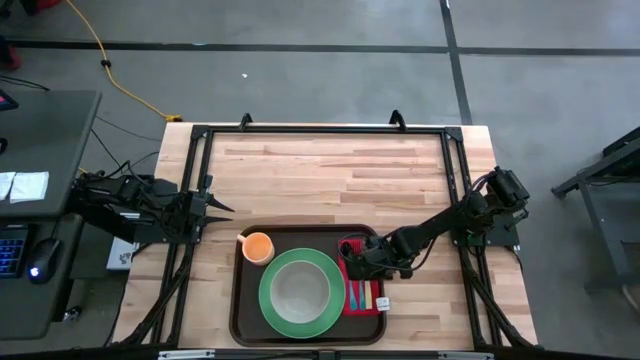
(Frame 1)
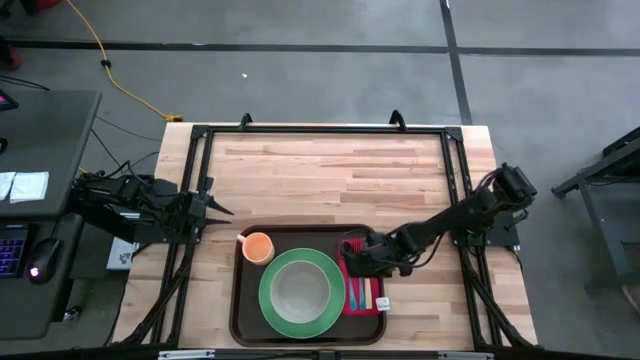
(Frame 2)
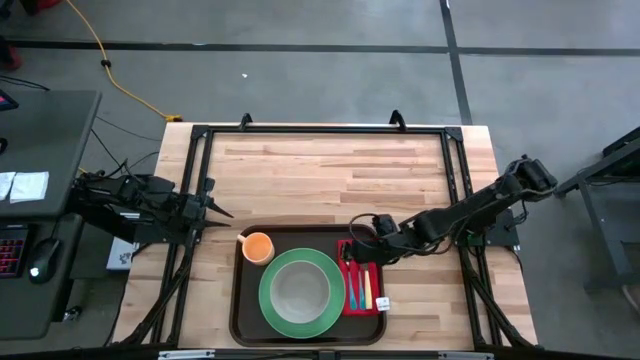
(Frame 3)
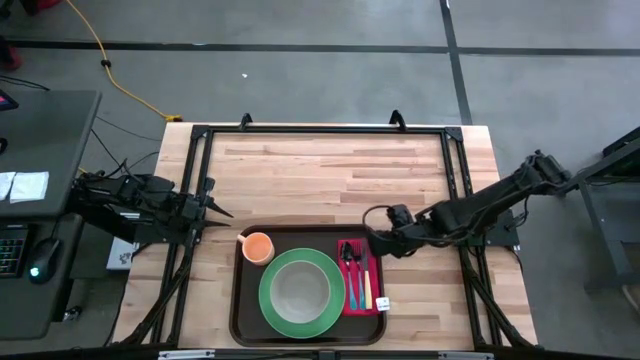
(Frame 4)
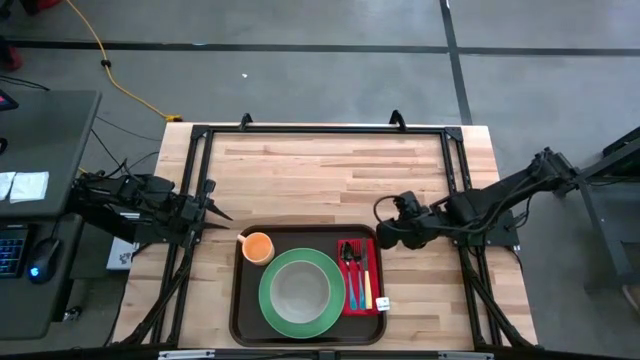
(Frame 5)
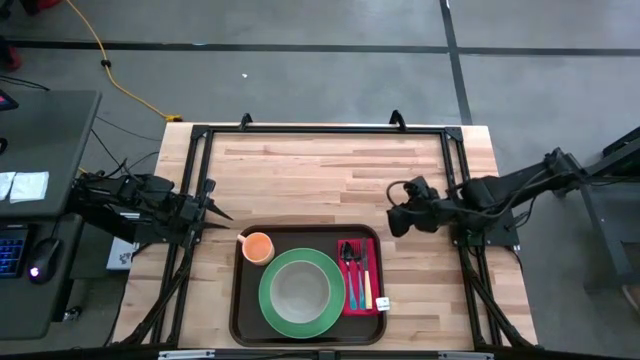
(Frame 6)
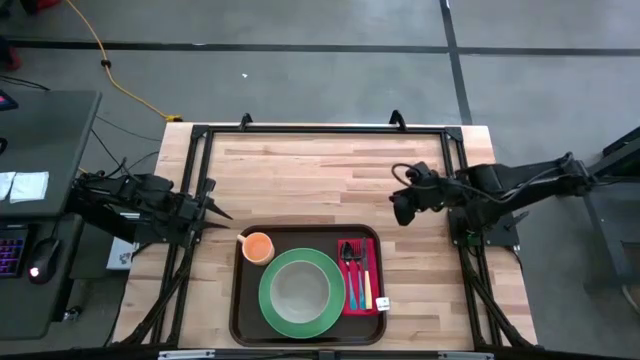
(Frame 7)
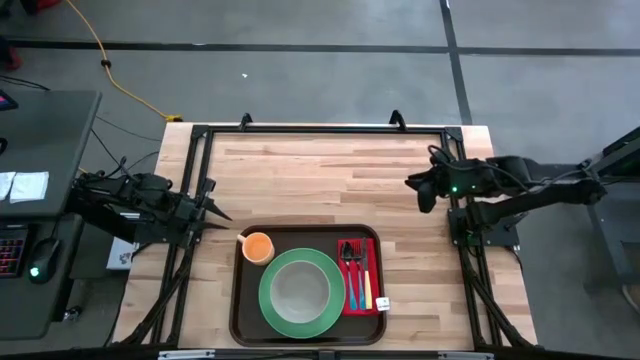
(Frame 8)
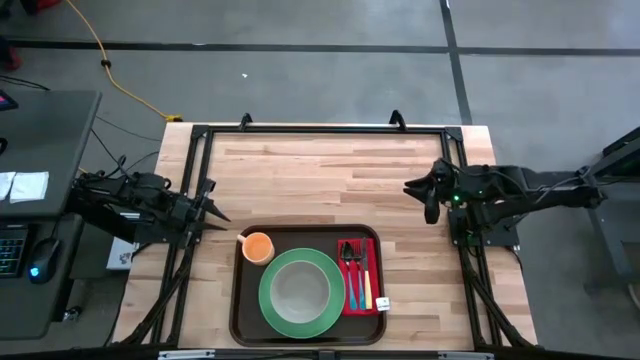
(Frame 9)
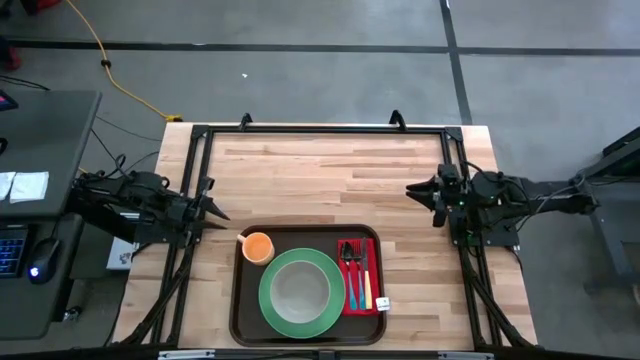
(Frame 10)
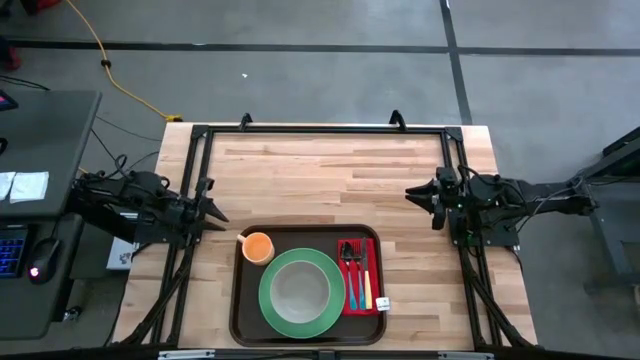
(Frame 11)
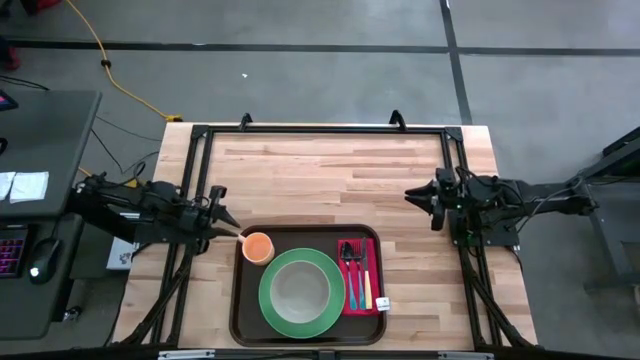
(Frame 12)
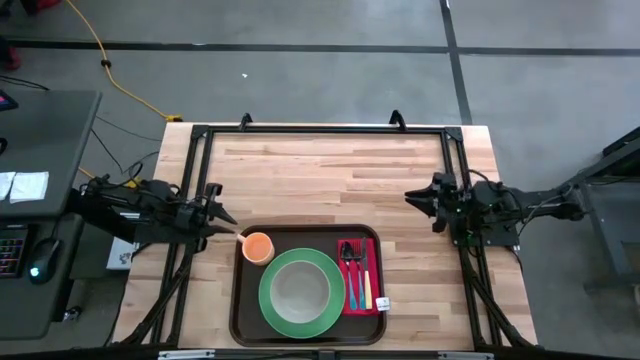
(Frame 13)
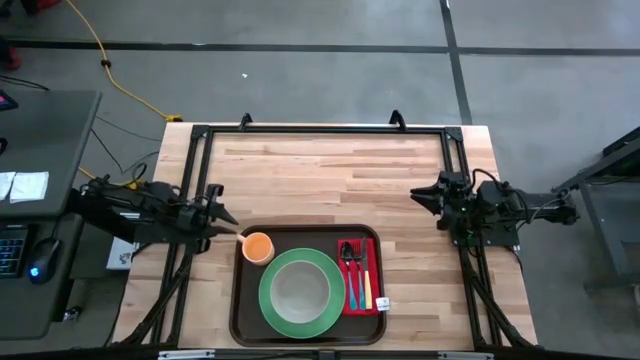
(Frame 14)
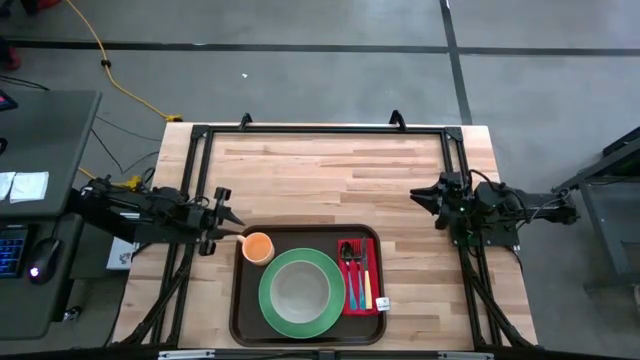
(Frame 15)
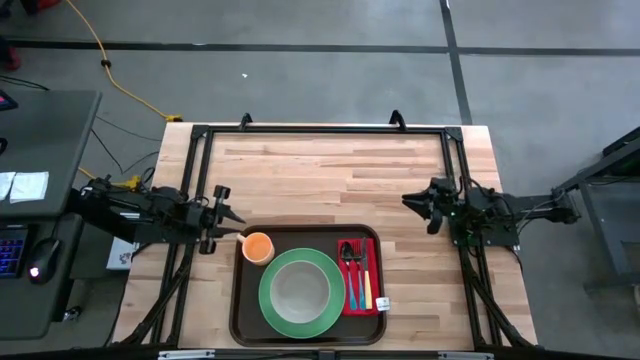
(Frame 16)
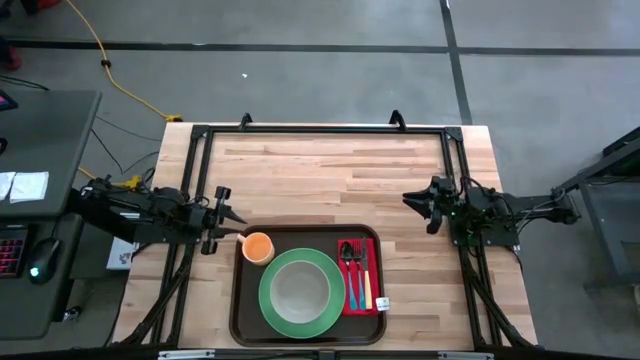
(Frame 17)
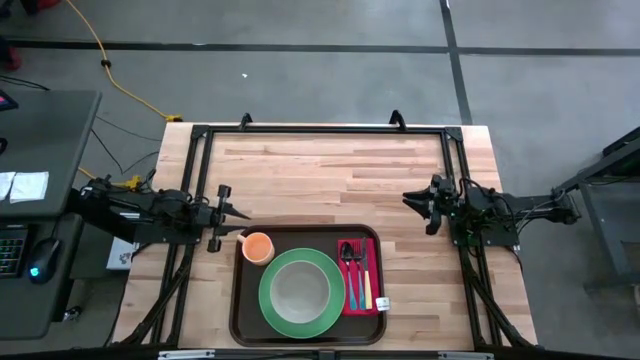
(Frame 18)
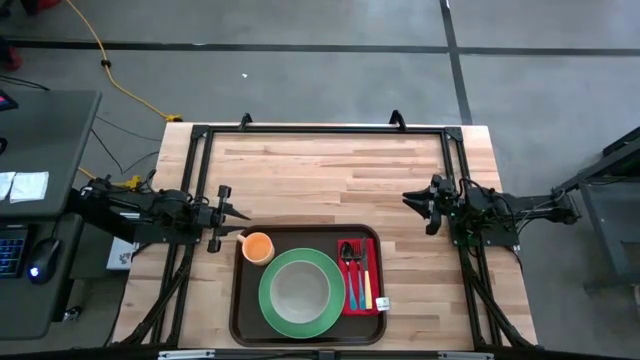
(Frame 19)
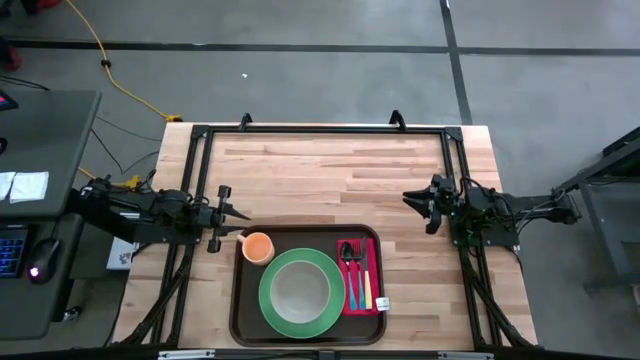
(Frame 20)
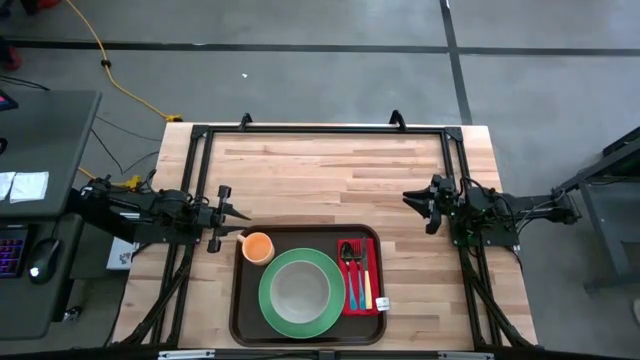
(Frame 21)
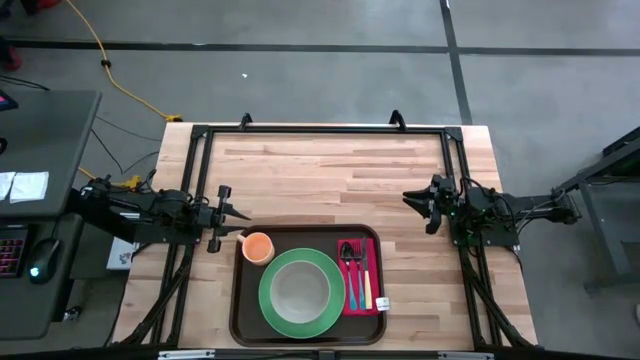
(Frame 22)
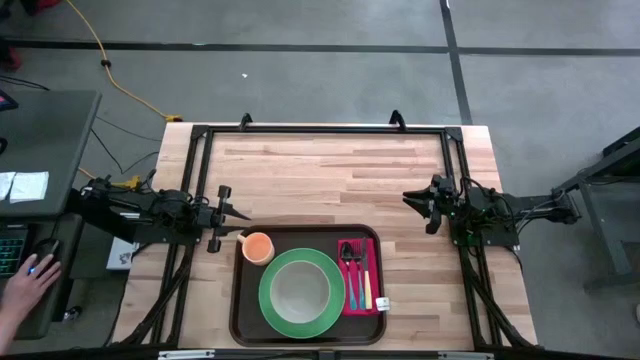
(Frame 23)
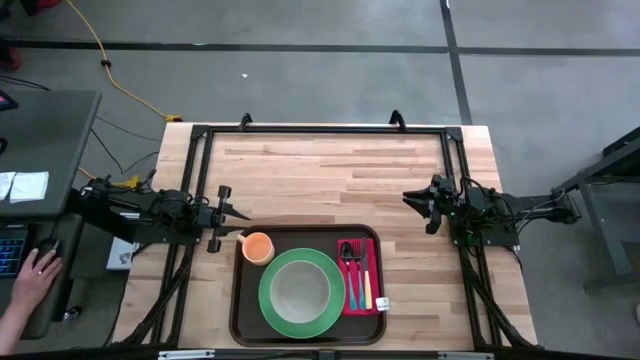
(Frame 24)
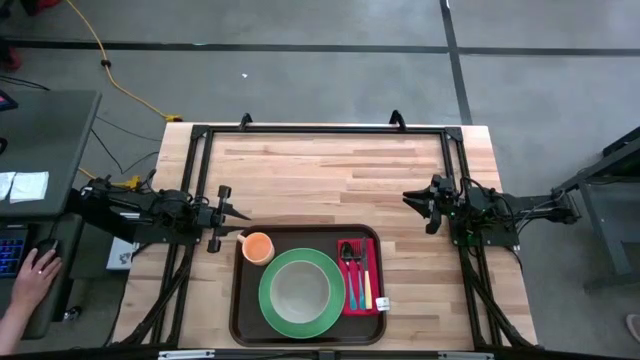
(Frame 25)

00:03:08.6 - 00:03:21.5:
Task: Set up tray
Return to Home Position

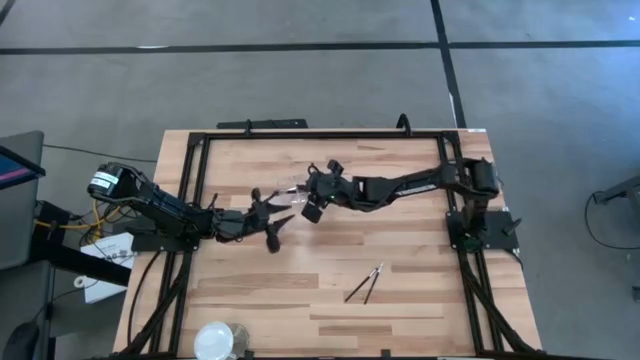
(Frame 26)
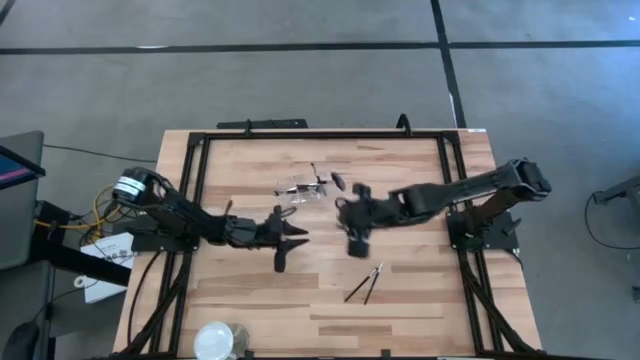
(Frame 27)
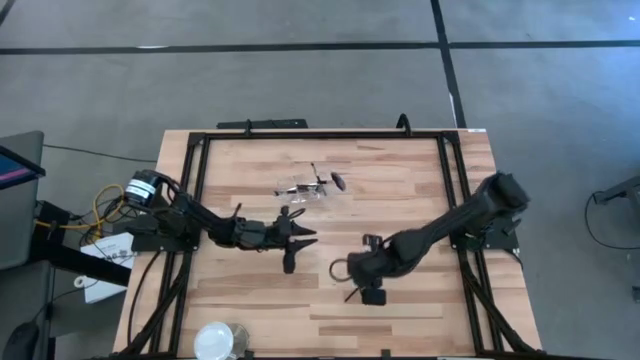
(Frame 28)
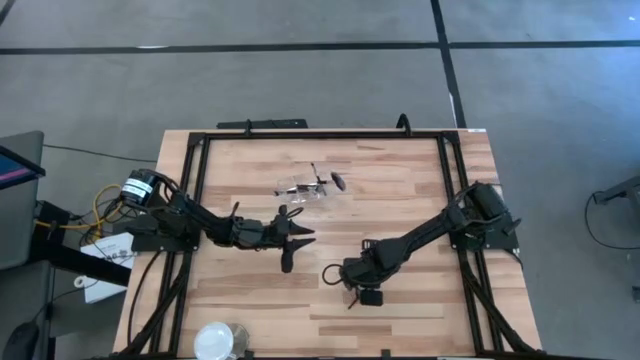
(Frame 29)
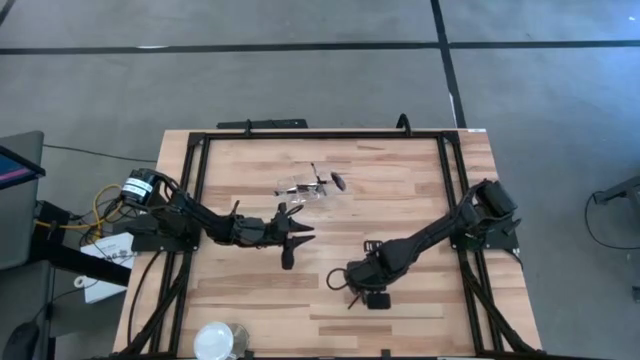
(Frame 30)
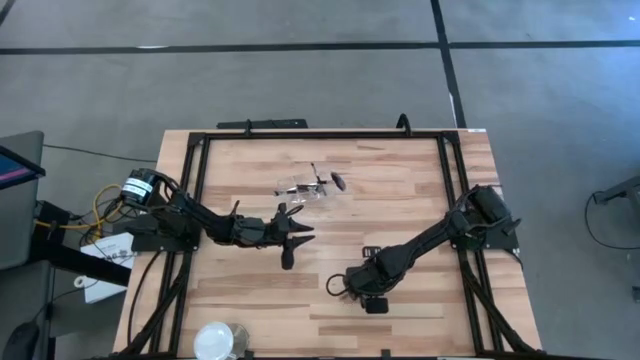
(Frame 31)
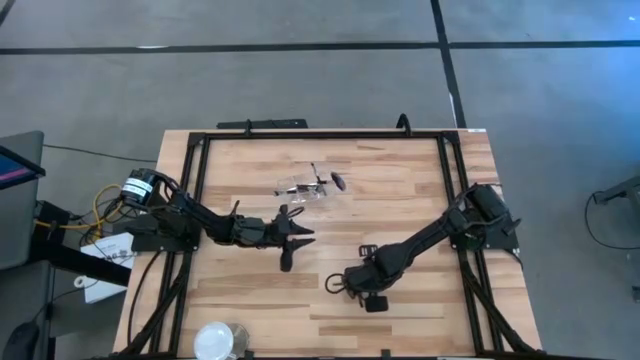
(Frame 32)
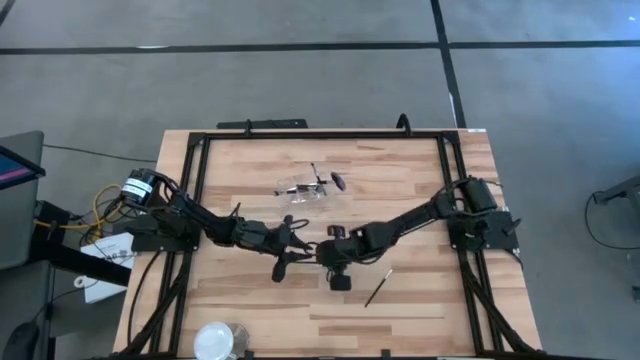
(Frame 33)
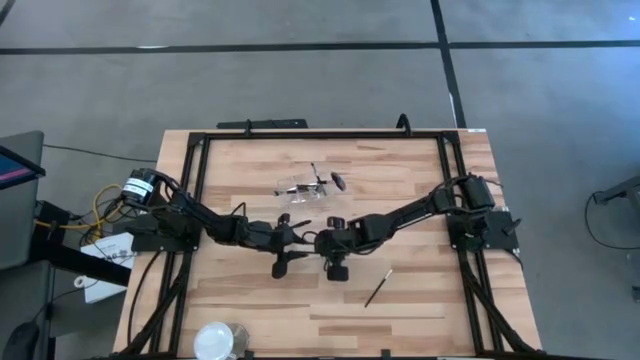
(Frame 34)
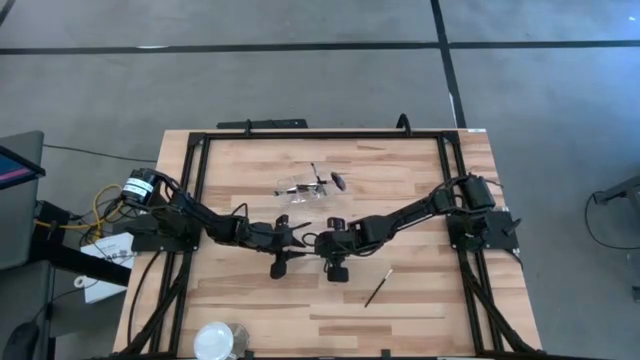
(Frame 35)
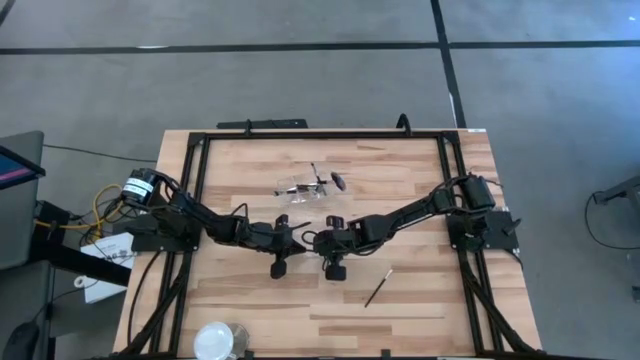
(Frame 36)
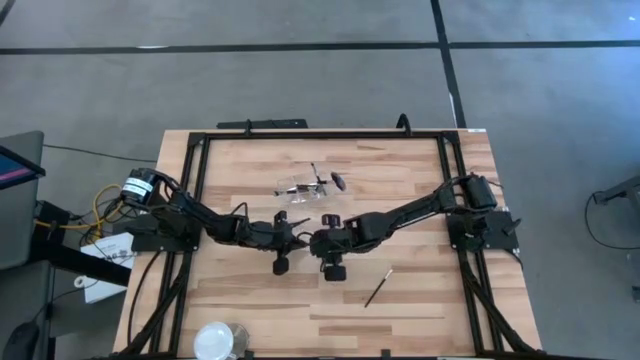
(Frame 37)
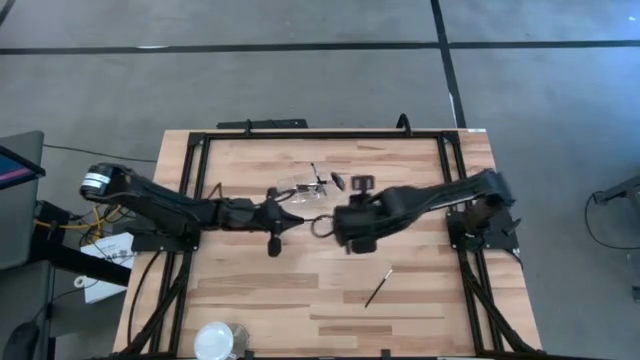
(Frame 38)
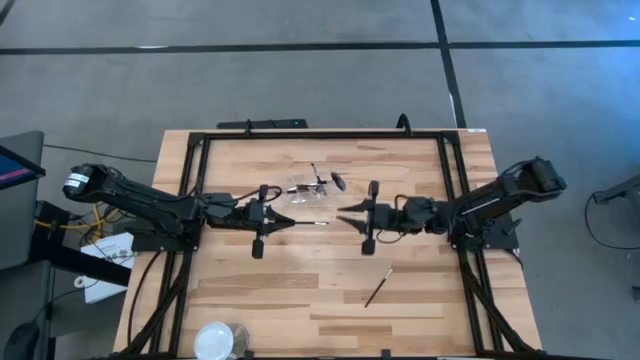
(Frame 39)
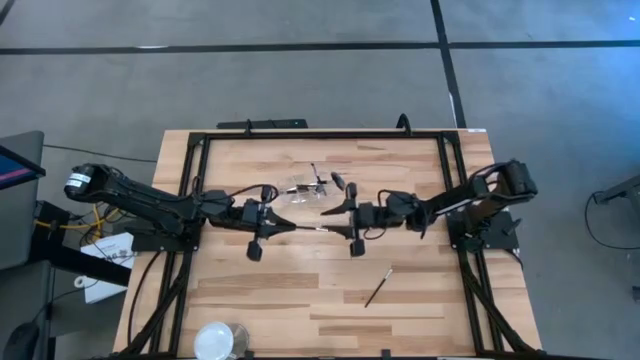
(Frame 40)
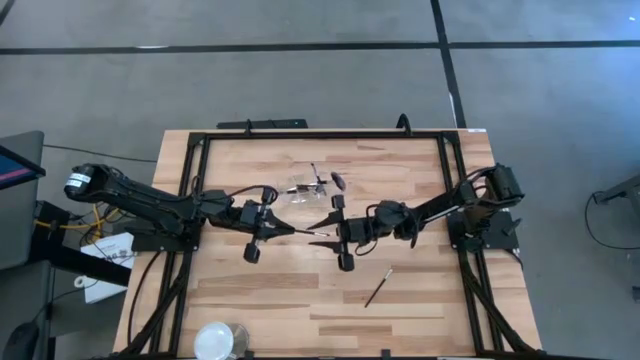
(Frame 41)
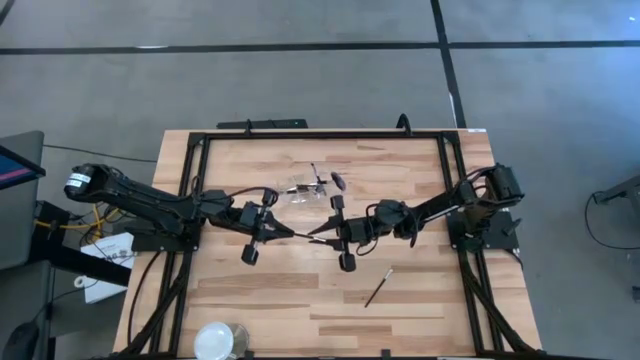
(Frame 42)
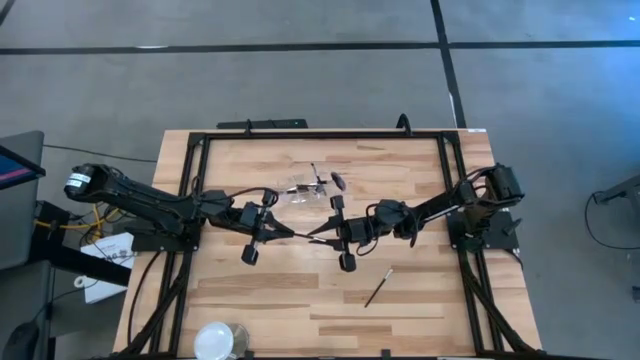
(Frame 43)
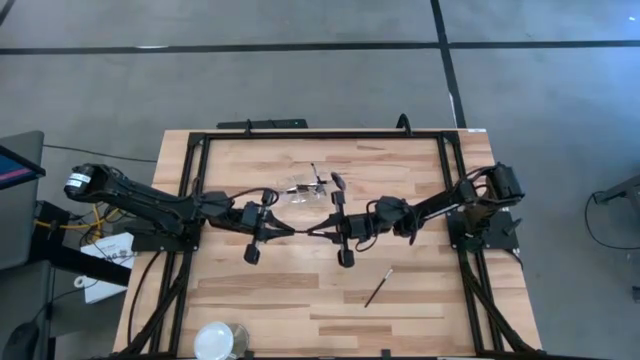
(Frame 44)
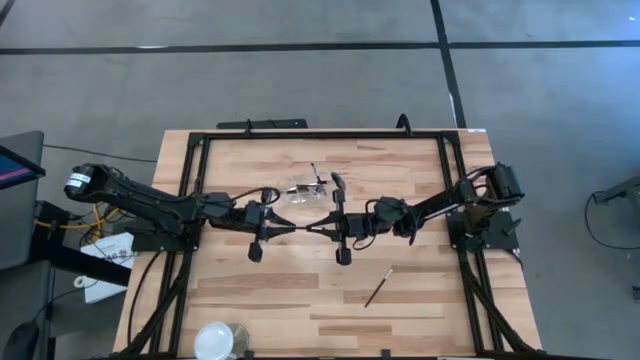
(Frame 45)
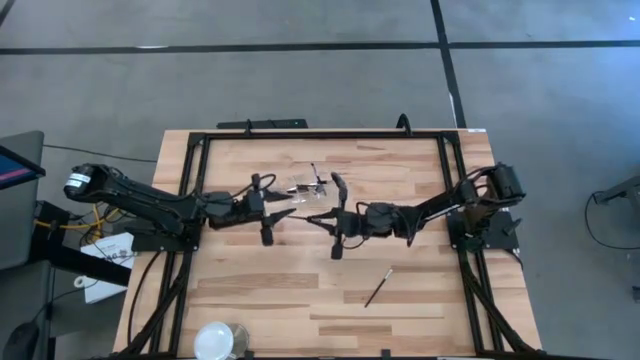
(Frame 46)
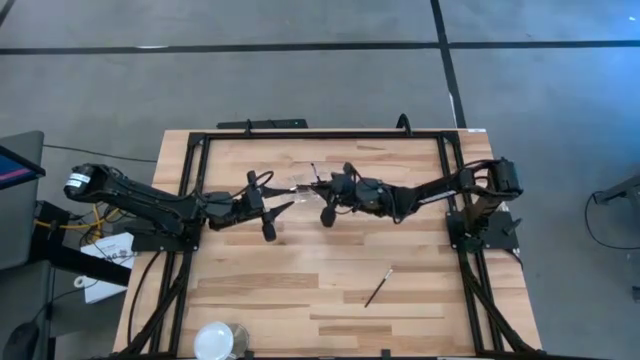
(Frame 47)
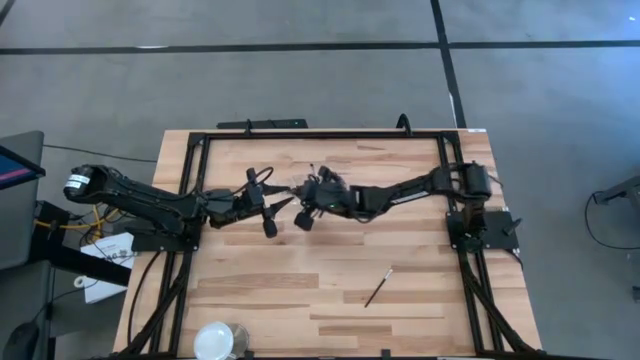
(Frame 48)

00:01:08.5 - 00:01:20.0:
Task: Put items in baskets/containers
Put the black eyeshadow brush into the transparent organizer
